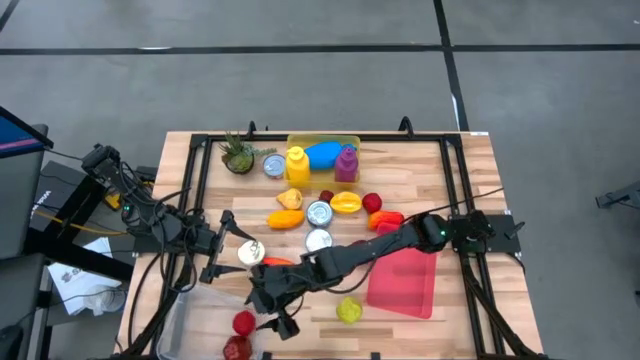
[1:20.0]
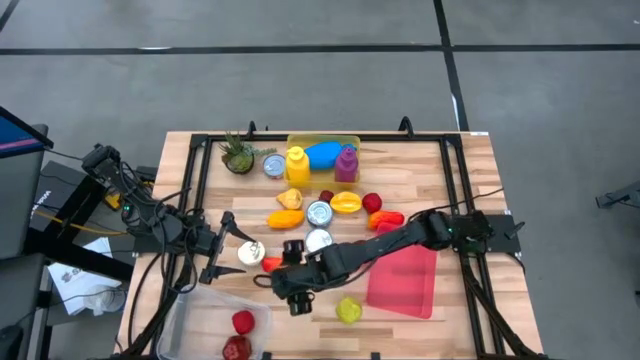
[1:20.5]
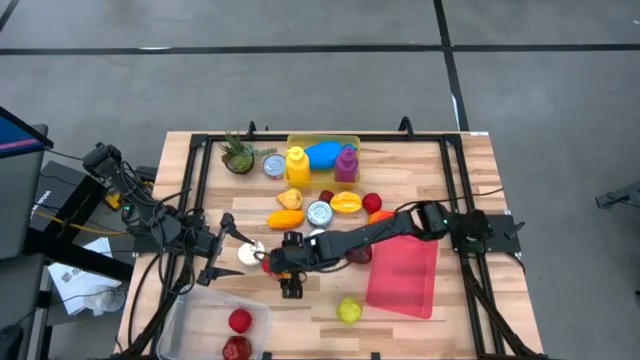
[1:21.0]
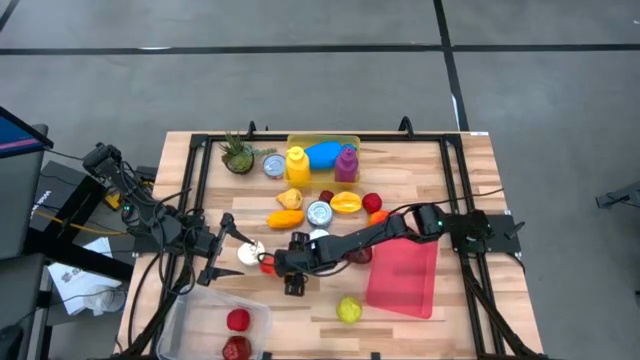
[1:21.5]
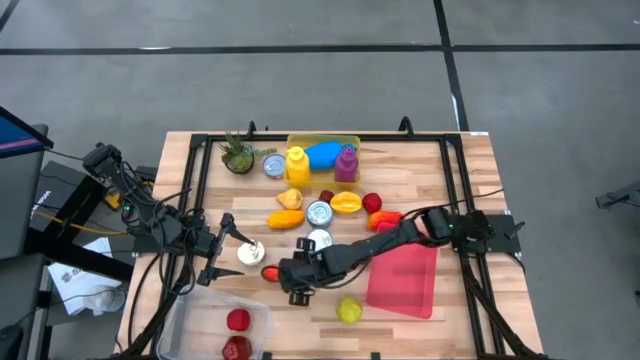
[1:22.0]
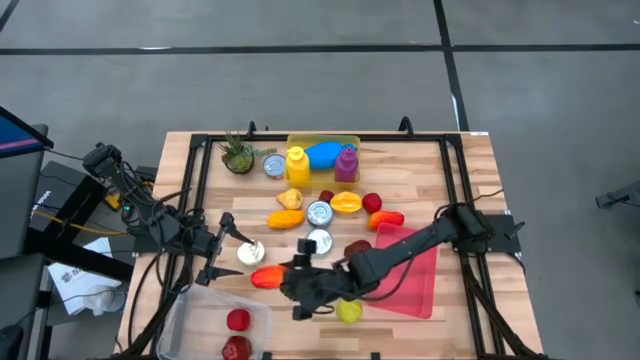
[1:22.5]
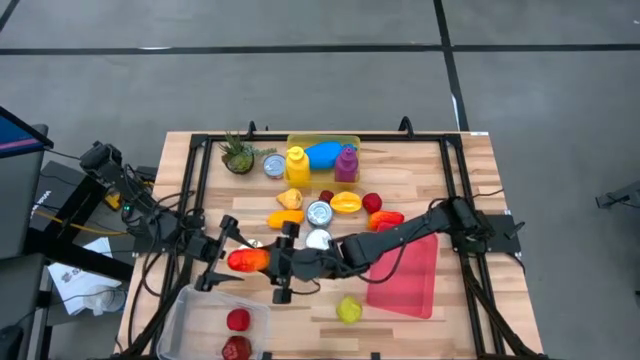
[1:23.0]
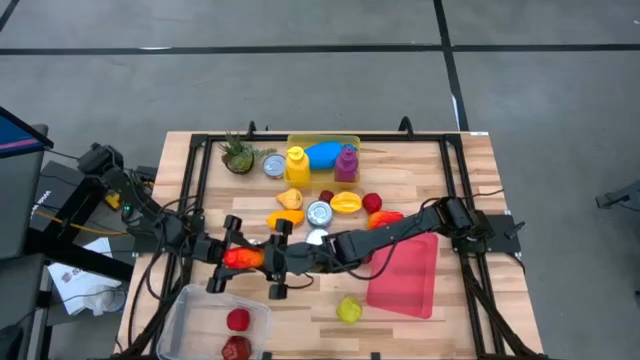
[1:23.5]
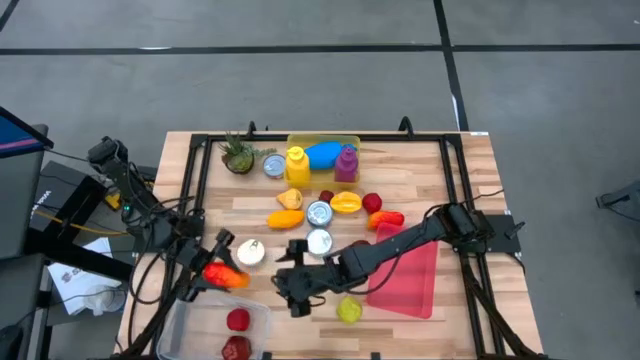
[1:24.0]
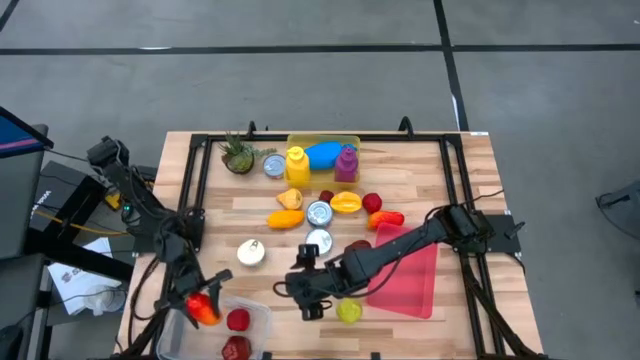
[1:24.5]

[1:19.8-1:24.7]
Task: Pick & Place Food Item
Put the bottom red and yellow mango into the white bin

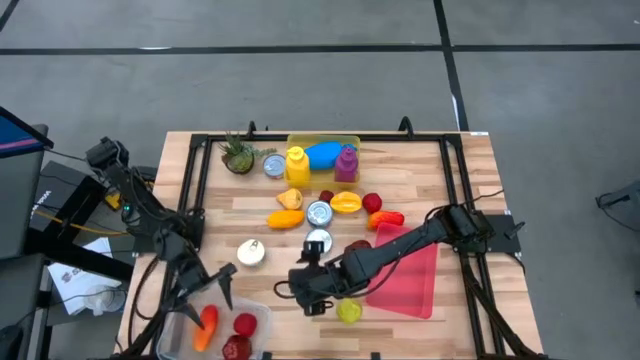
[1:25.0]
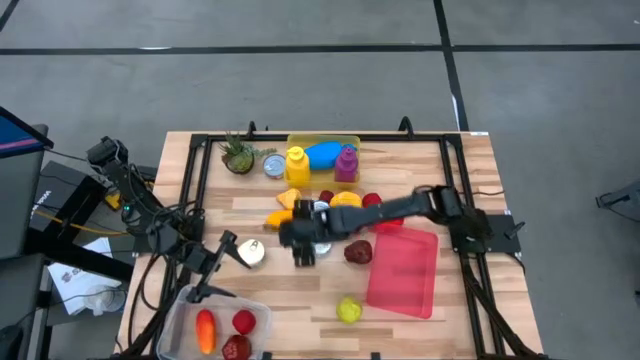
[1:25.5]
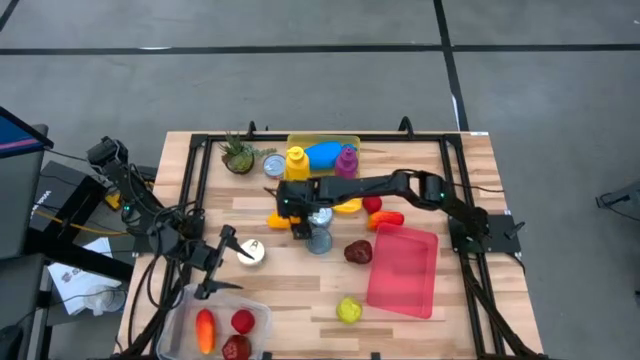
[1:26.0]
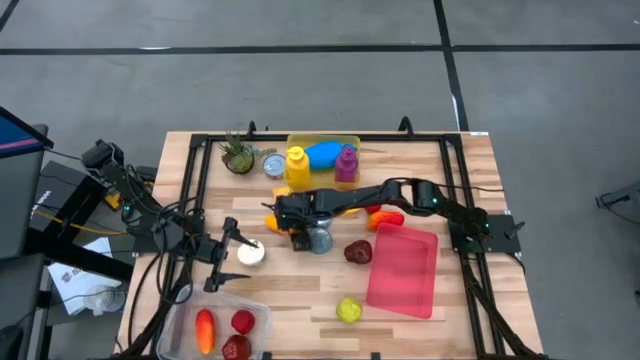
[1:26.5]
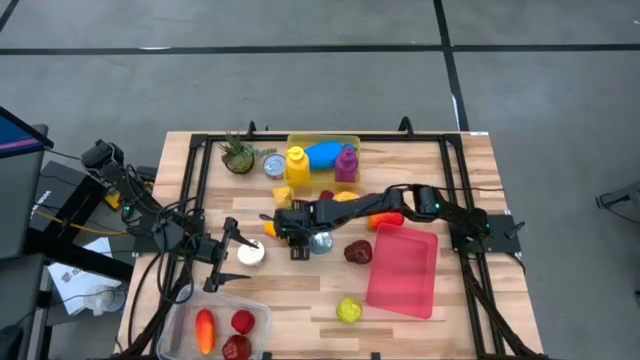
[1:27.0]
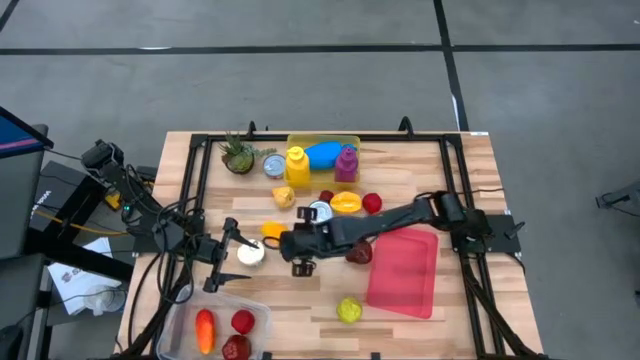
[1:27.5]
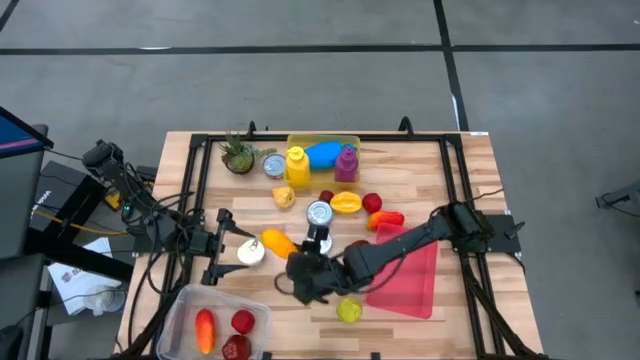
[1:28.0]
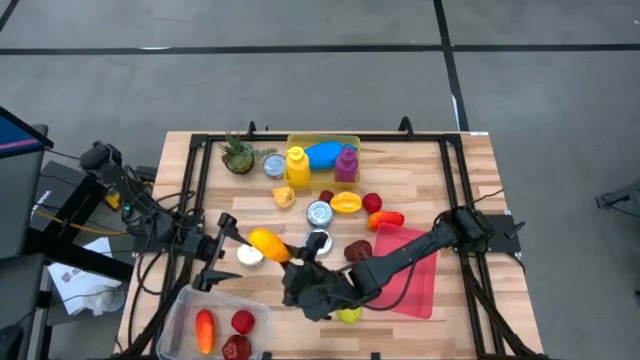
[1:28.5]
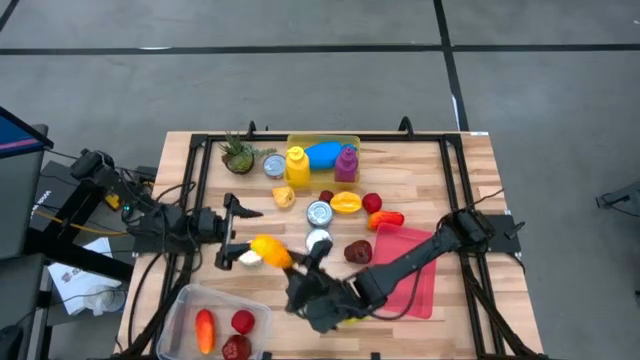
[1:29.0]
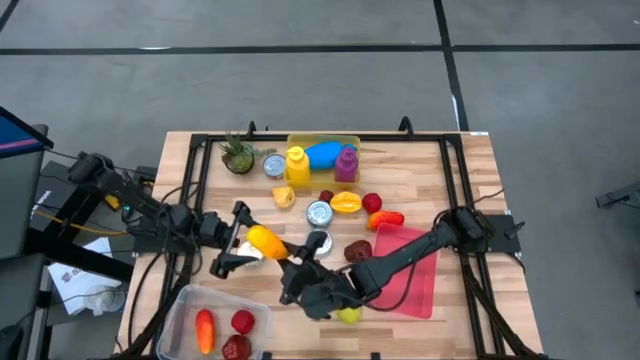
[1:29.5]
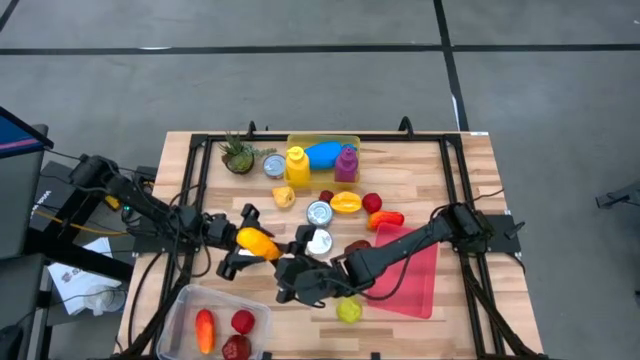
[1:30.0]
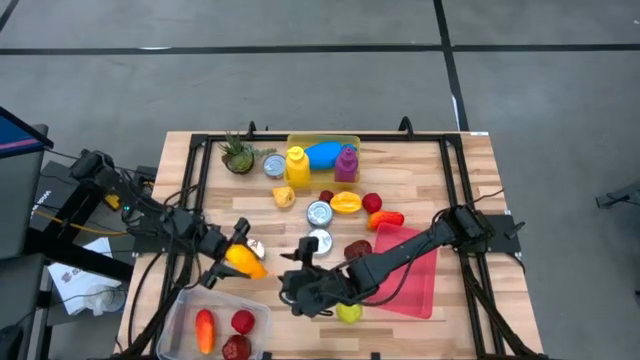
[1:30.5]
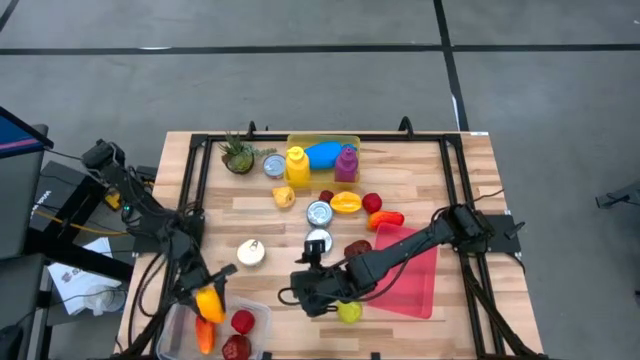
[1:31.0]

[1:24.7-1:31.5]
Put the left yellow mango into the white bin

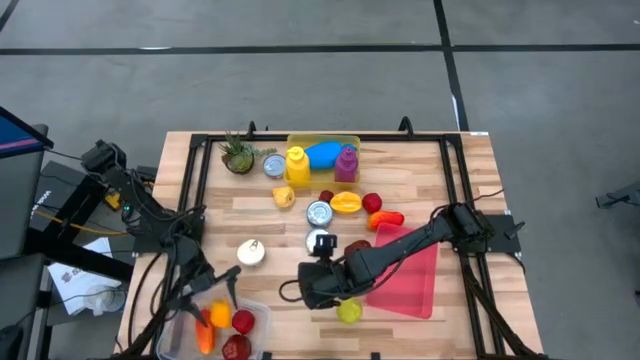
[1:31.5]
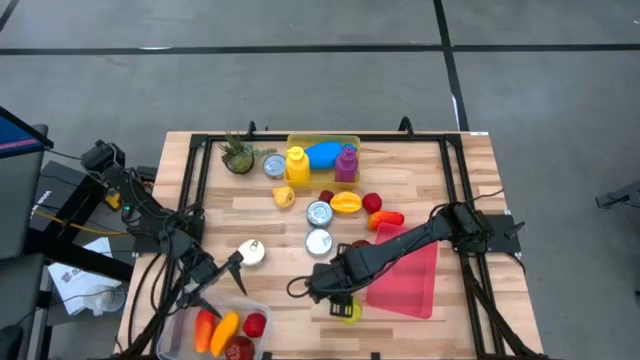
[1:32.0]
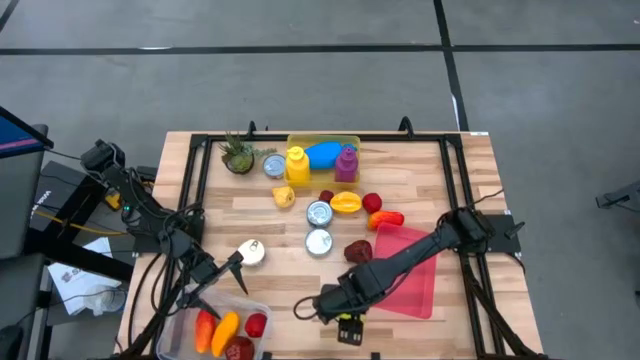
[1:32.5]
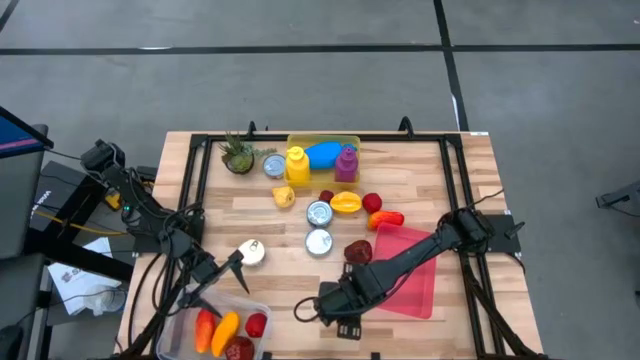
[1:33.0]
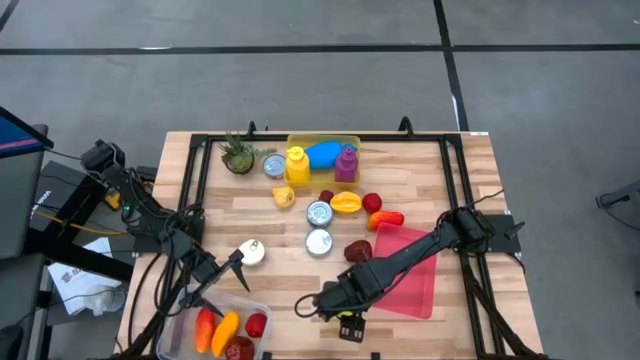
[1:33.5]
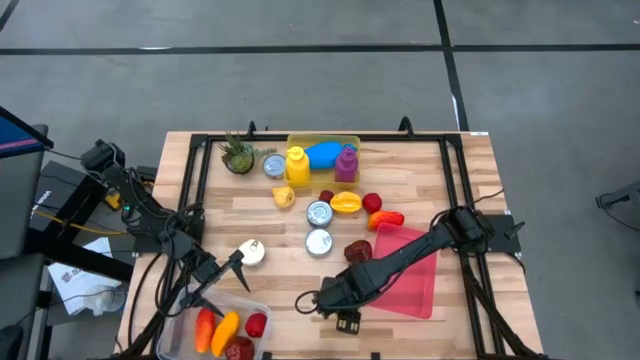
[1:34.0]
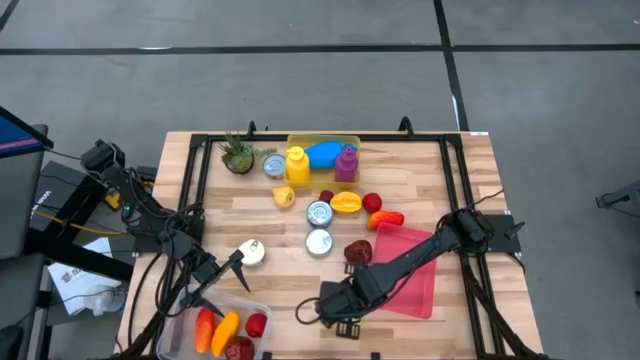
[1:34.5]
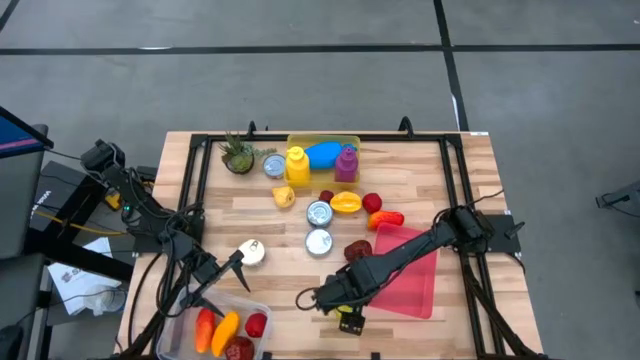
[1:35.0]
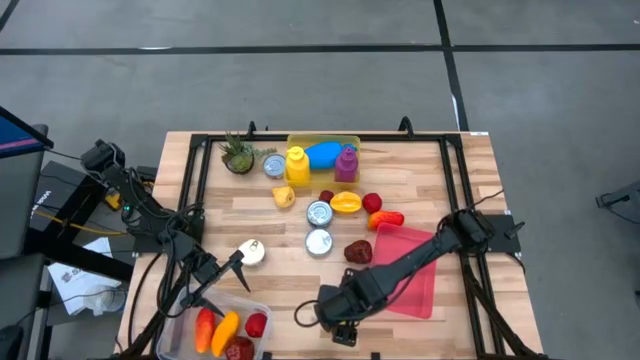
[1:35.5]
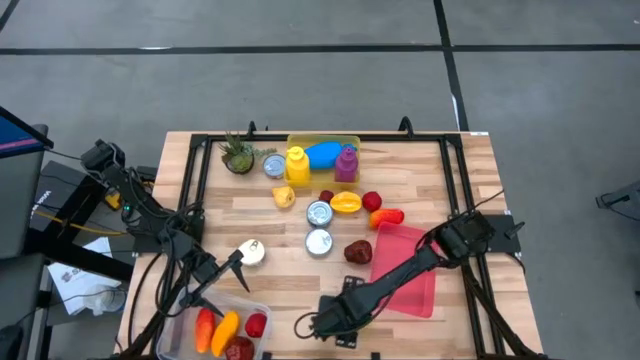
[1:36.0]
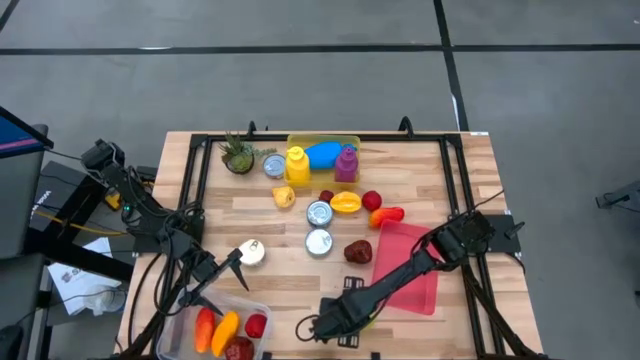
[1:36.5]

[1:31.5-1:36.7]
Put the green apple into the white bin

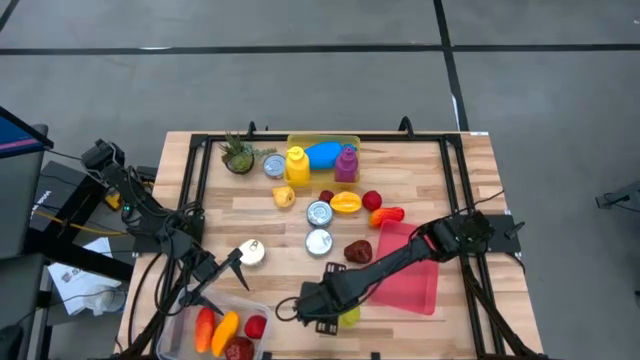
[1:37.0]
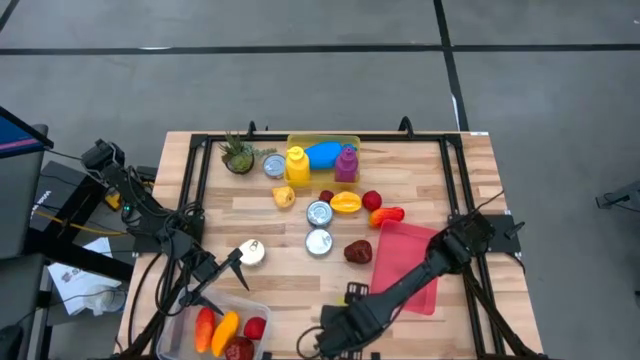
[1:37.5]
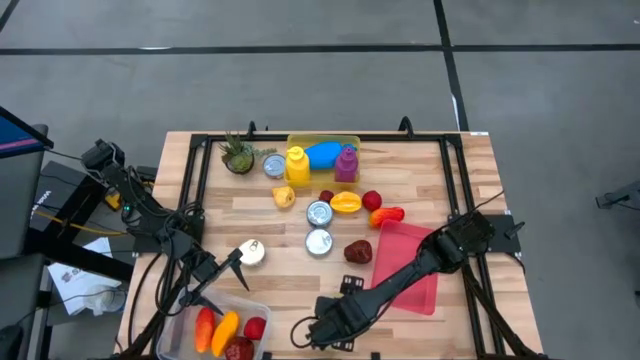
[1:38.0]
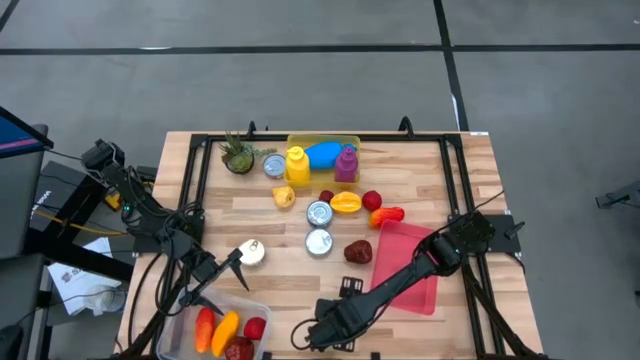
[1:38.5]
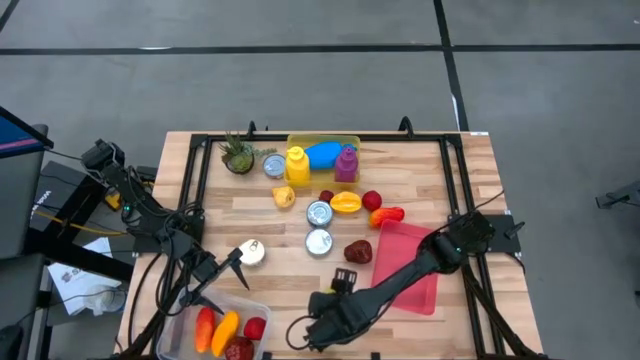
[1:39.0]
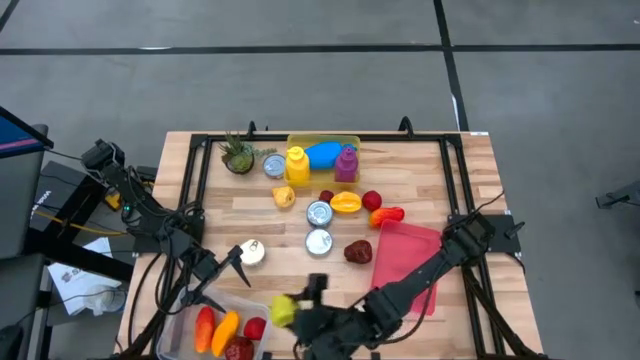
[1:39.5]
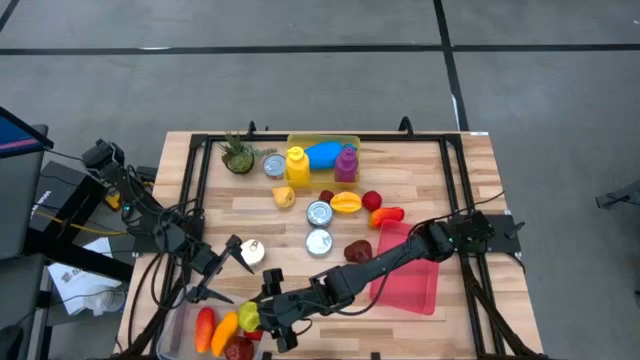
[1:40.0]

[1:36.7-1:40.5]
Put the green apple into the white bin

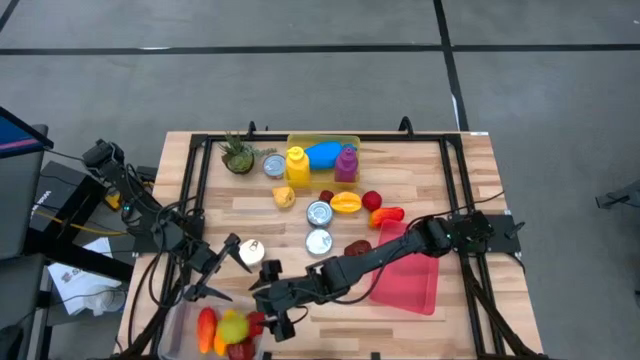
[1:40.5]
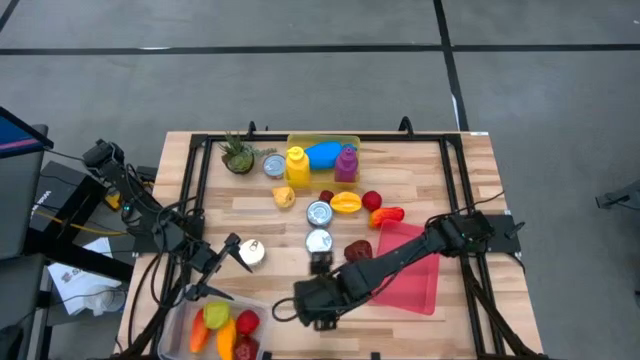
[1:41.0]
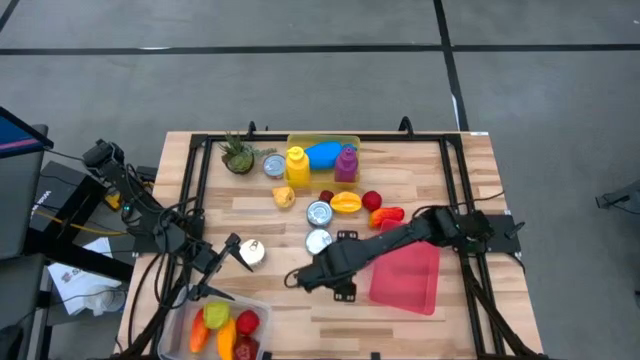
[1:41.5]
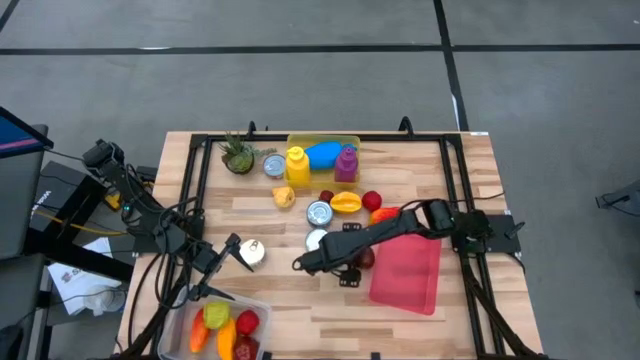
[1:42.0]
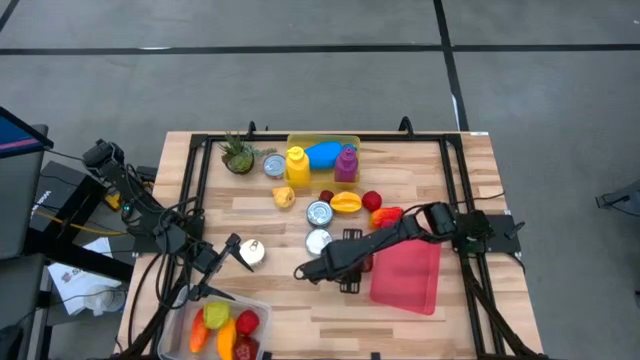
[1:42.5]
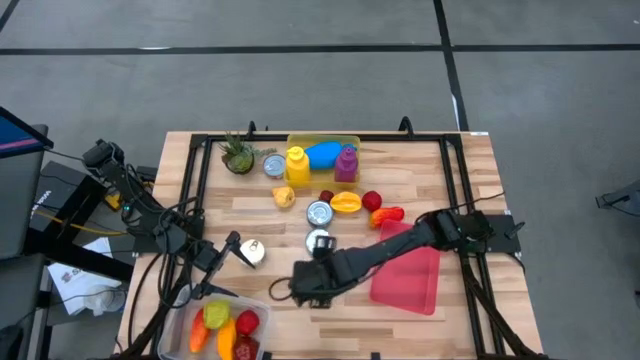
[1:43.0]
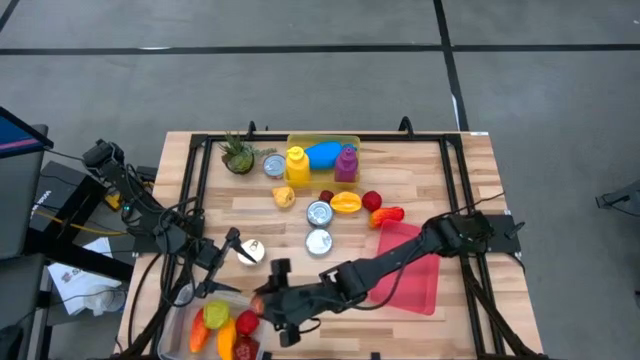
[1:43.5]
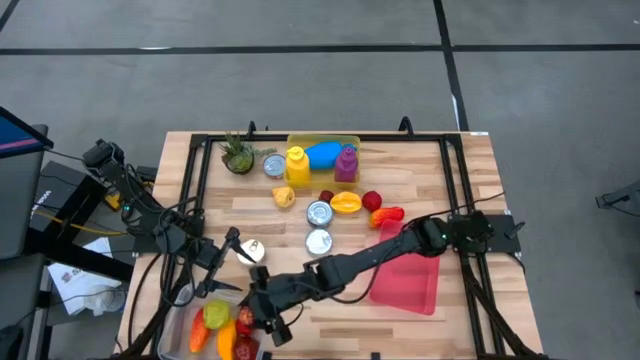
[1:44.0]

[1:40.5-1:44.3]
Put the red apple into the white bin
